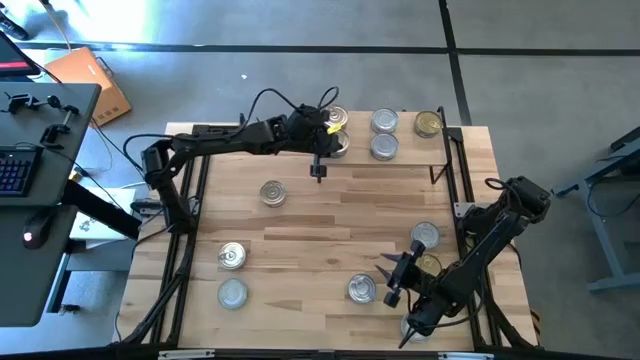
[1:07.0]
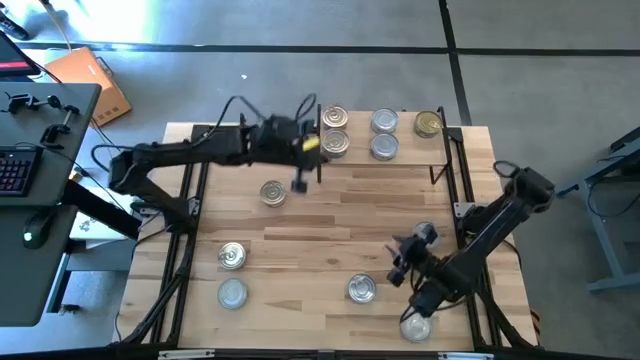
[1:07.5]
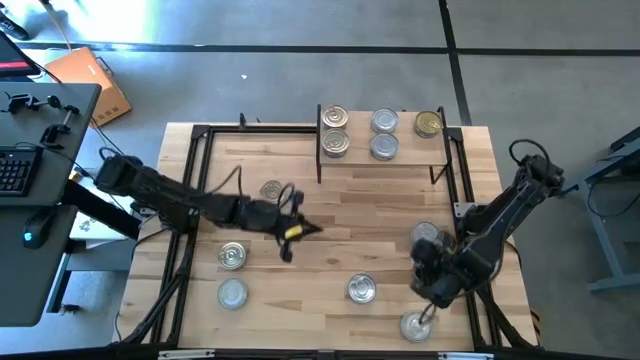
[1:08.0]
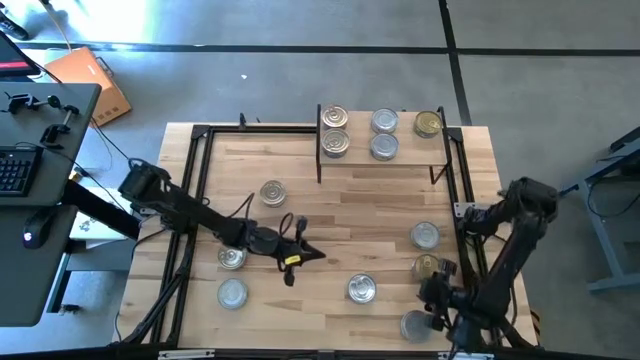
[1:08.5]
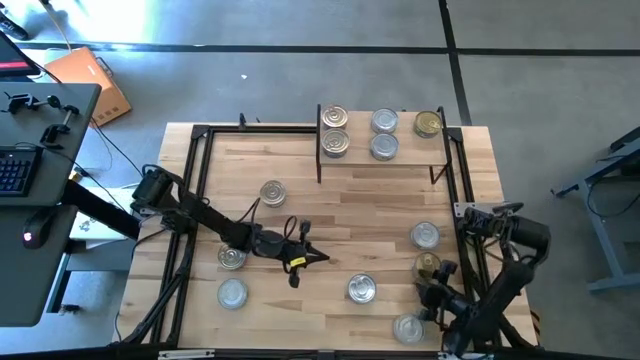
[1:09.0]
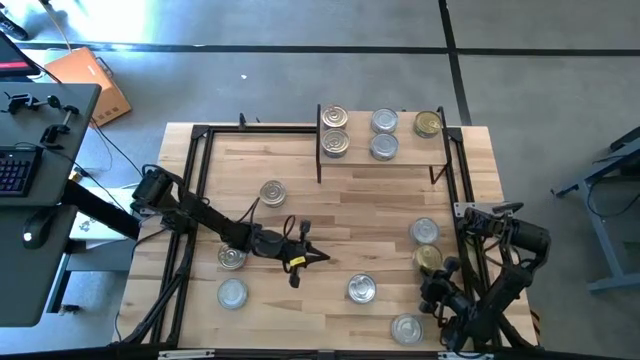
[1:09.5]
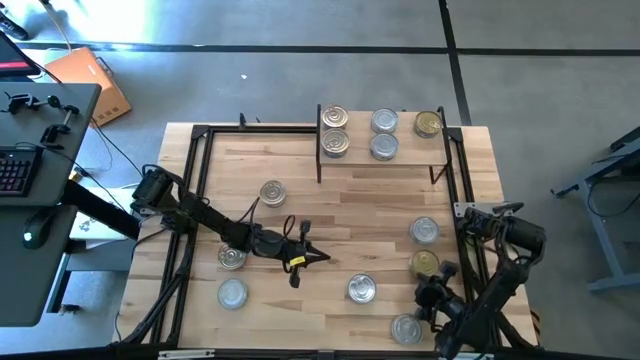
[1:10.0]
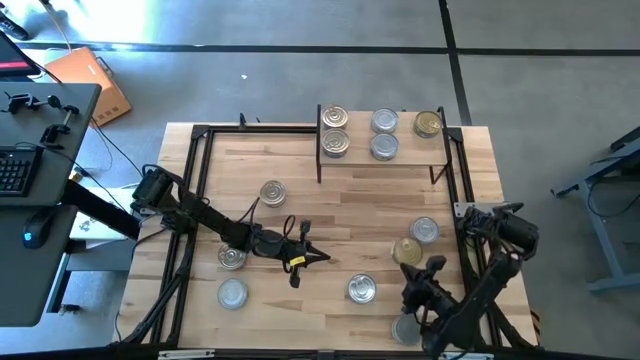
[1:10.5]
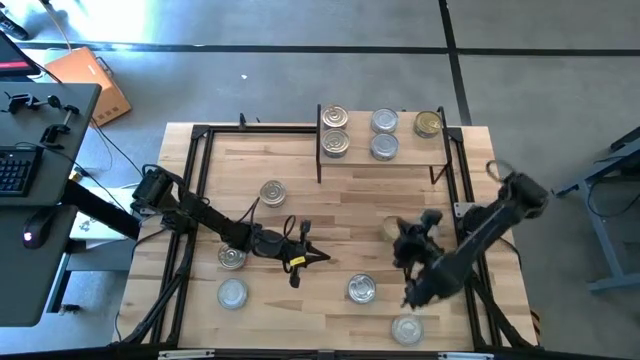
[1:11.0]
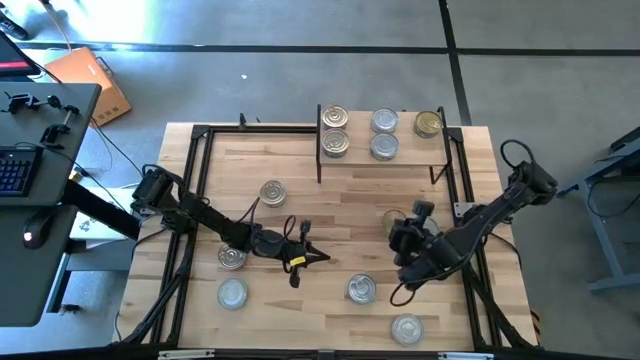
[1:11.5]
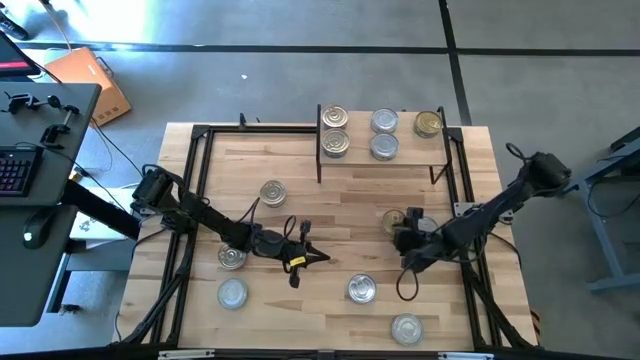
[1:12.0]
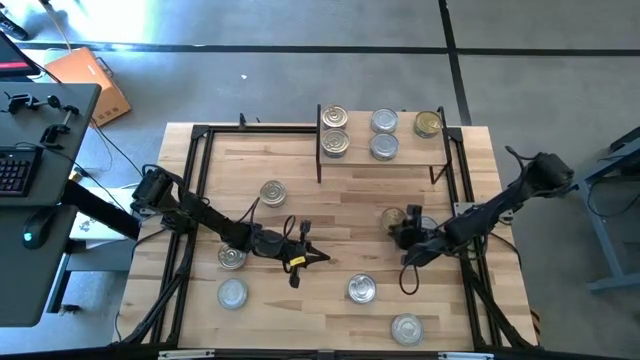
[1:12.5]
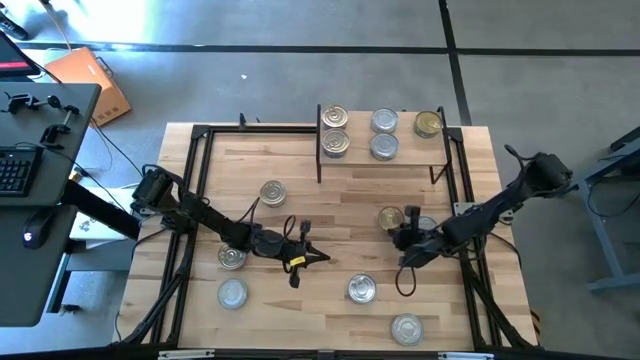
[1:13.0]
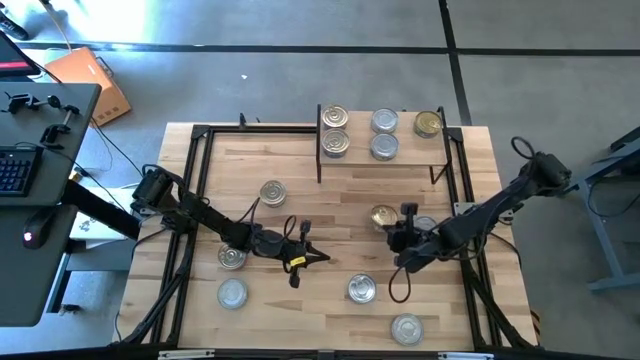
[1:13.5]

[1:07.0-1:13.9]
Task: Stack canned seafood by type on shelf
Put the green tuna can on the shelf

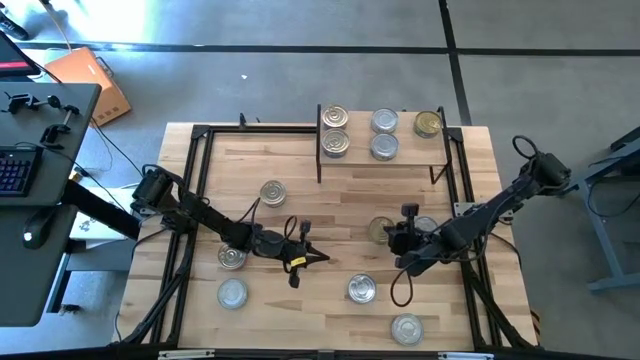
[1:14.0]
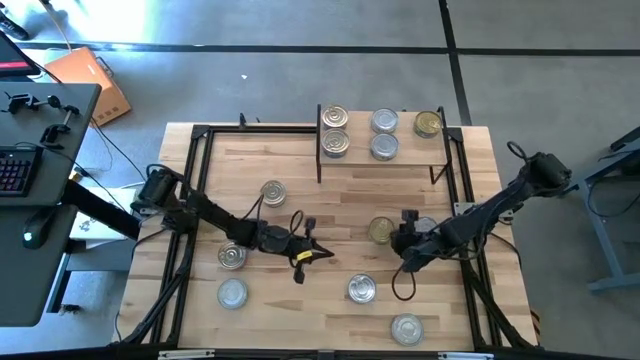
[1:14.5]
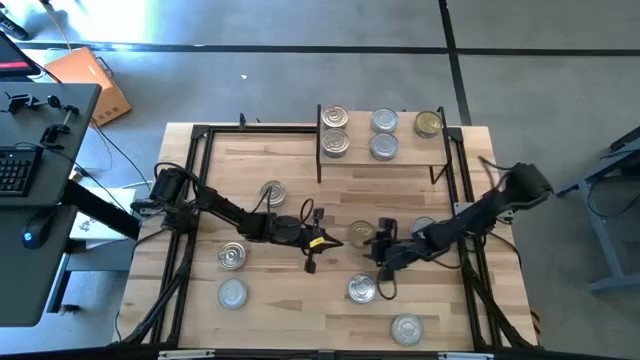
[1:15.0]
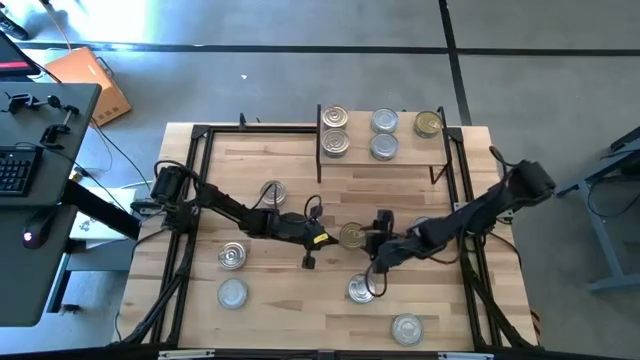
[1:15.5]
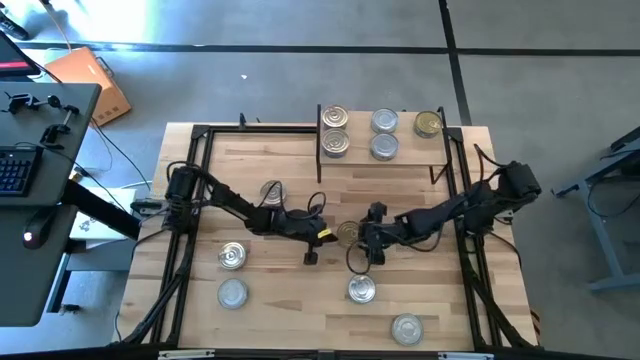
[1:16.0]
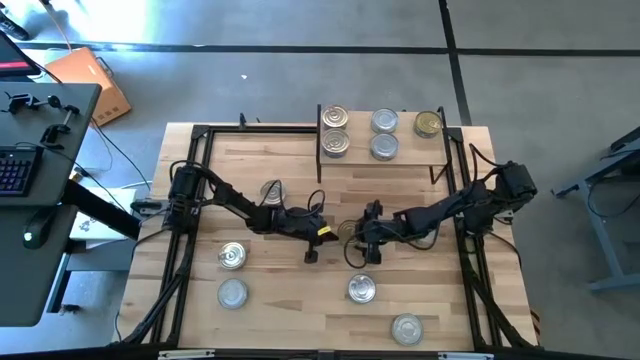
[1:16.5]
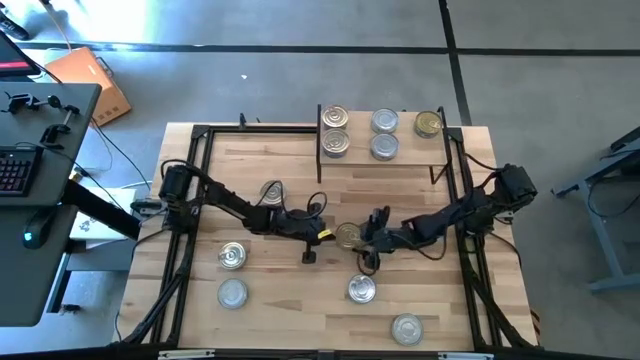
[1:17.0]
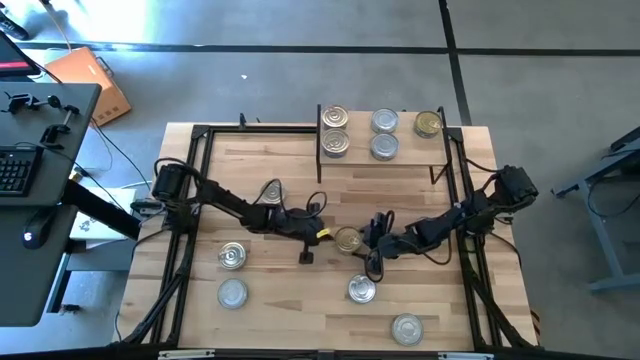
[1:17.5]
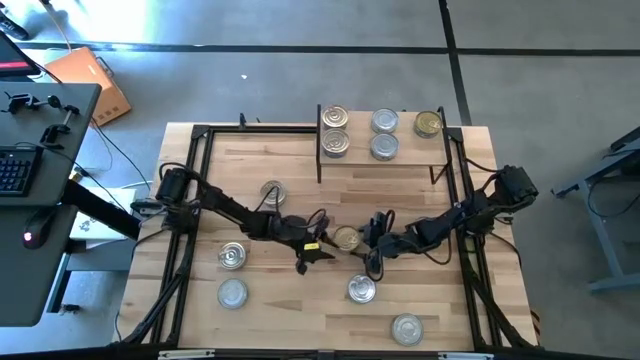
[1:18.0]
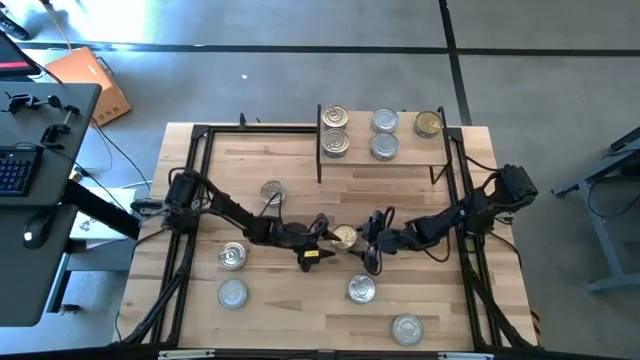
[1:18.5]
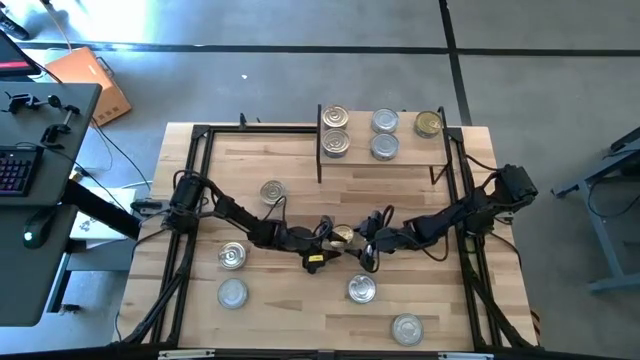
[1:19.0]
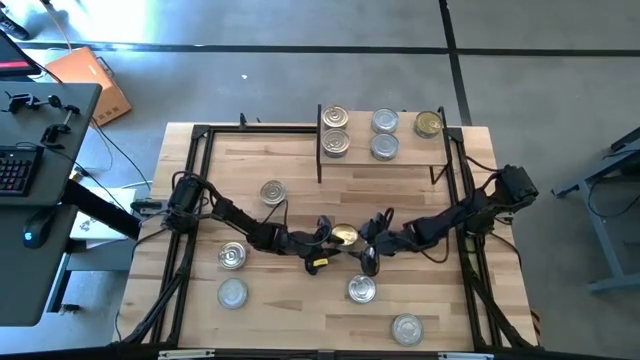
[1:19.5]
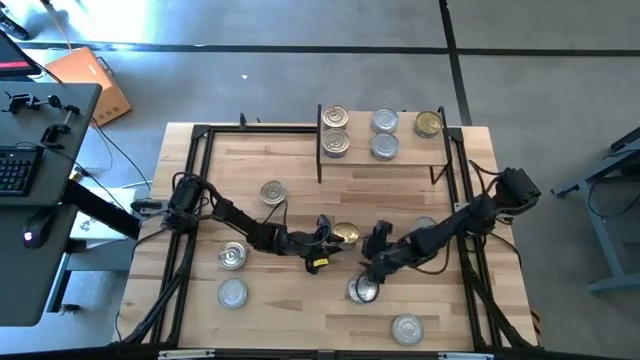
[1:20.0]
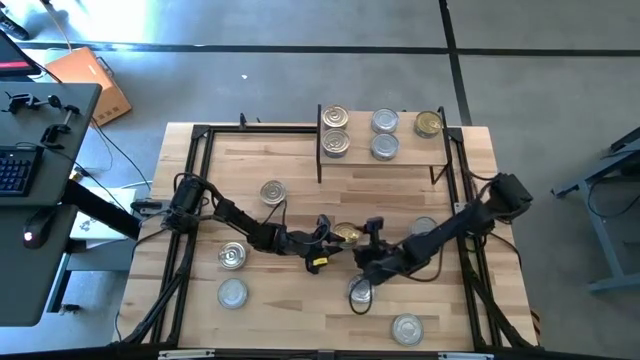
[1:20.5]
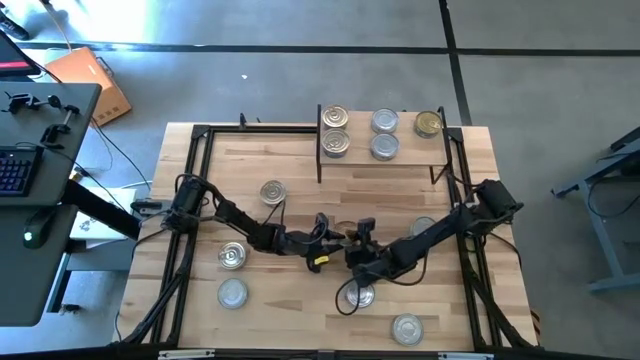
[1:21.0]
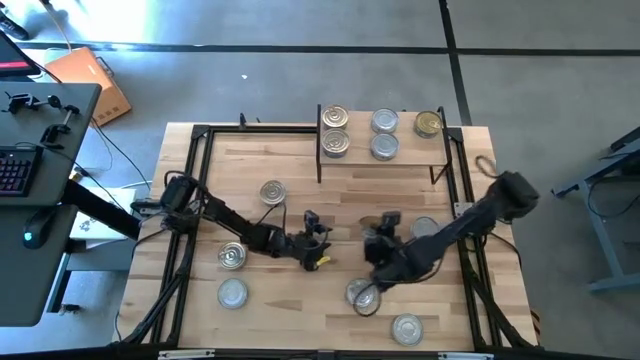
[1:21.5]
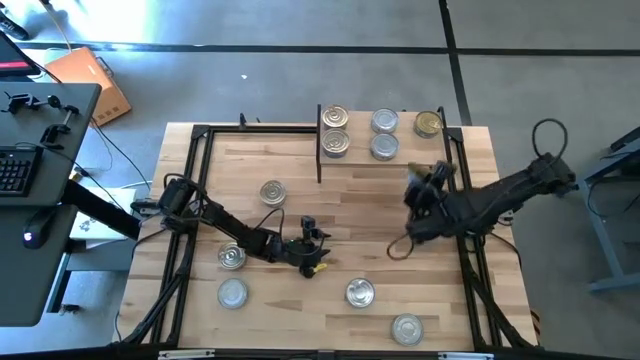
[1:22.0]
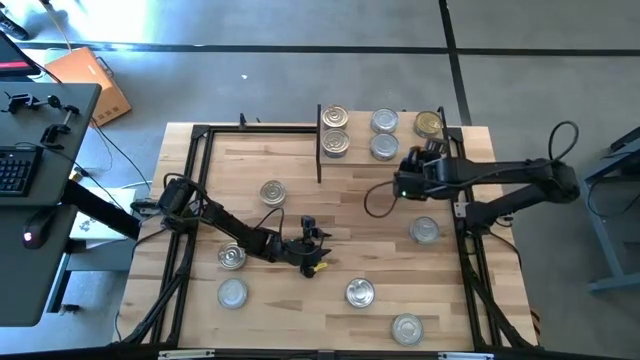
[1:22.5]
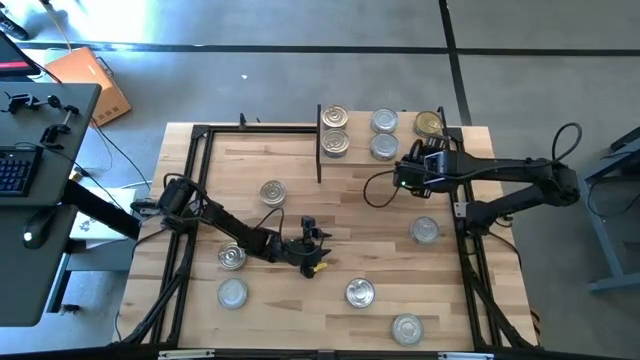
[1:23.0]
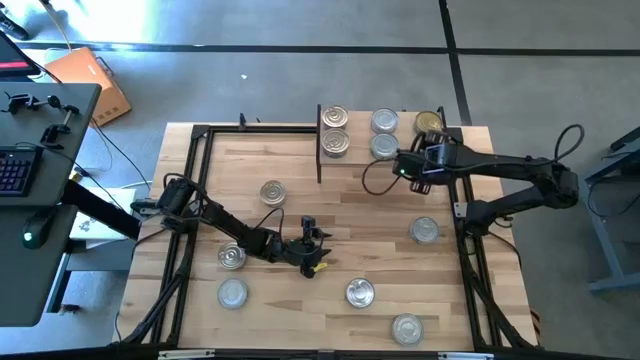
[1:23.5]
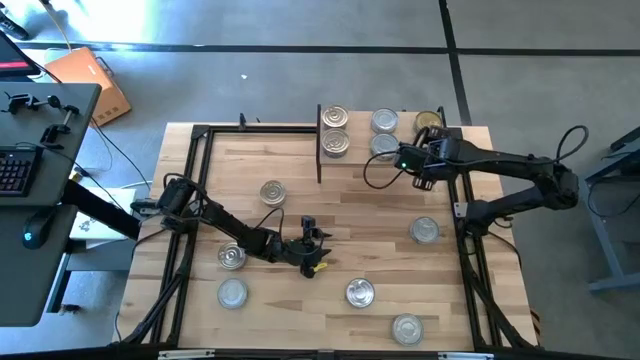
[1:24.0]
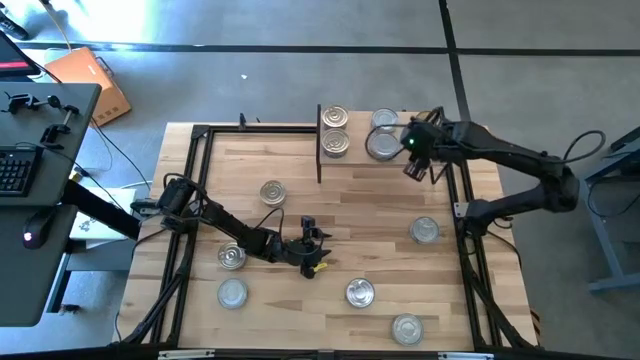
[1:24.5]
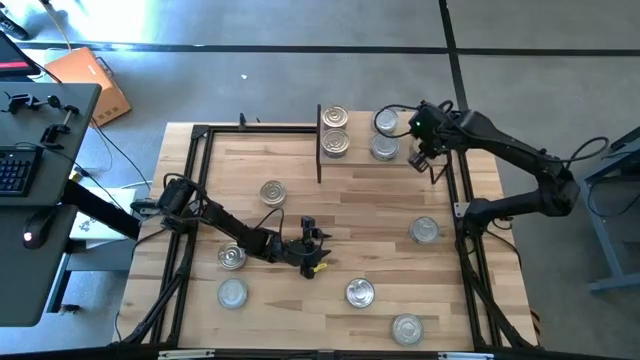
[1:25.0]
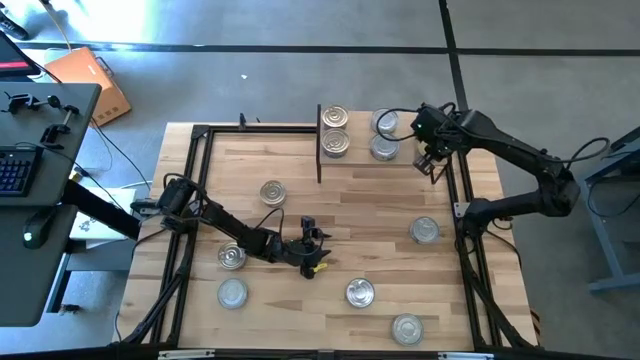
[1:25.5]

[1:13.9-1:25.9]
Put the green tuna can on the shelf

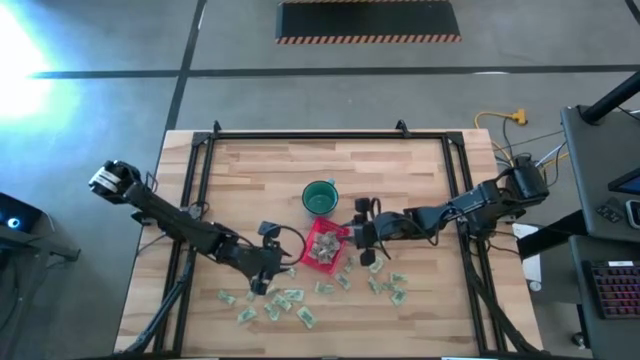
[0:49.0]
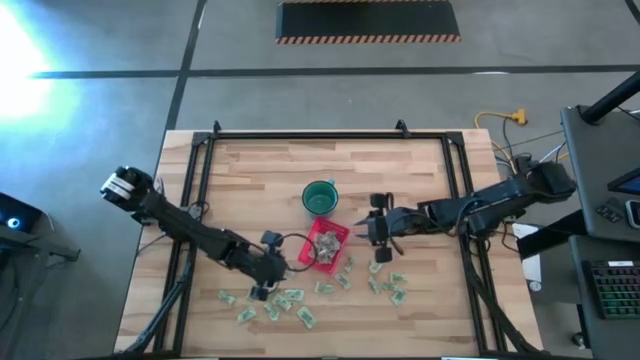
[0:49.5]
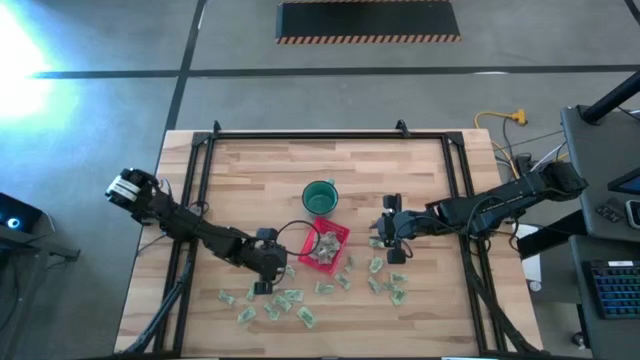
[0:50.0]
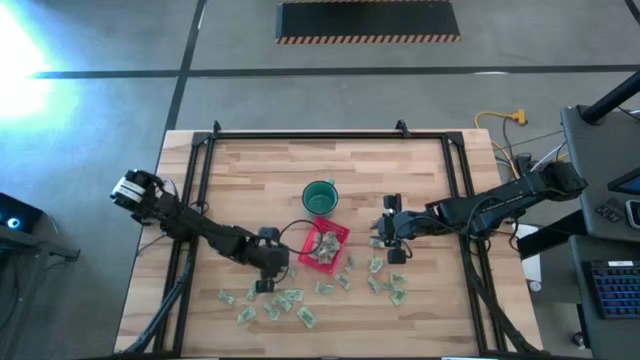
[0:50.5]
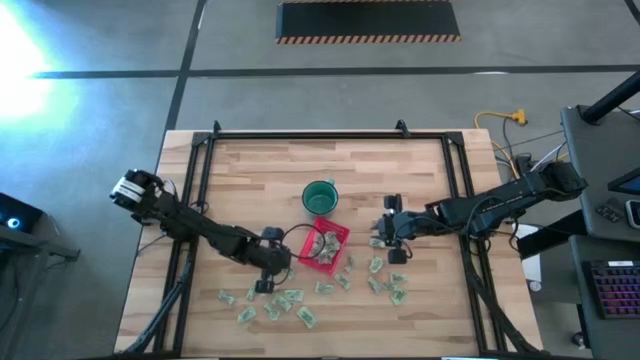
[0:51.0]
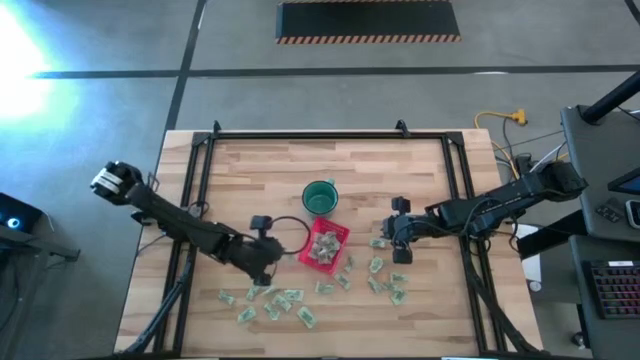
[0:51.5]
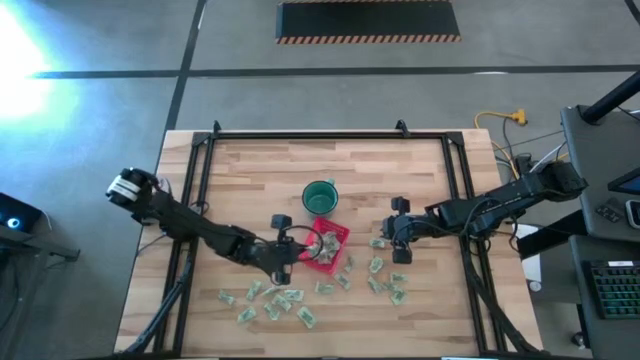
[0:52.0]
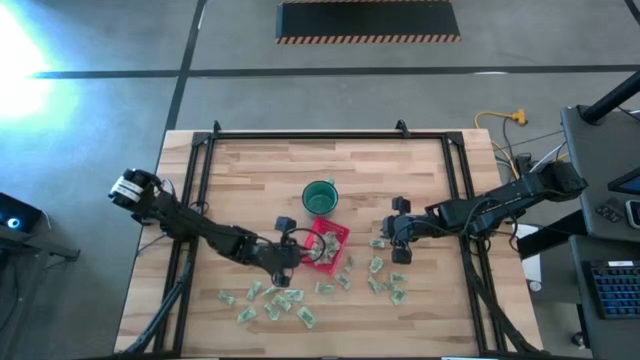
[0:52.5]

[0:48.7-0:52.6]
Task: Pick and place items into bin
Put the light green stevia packet into the red bin
